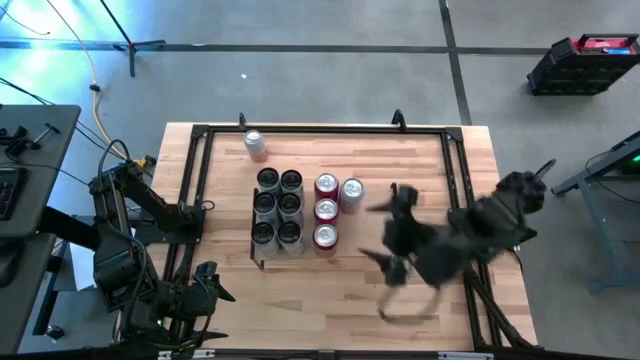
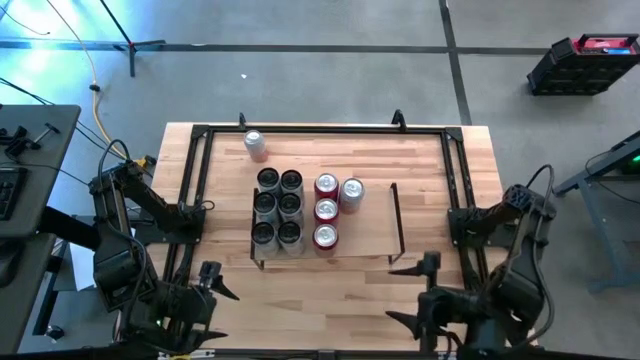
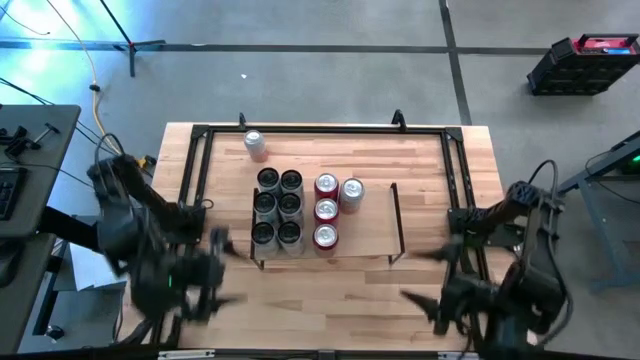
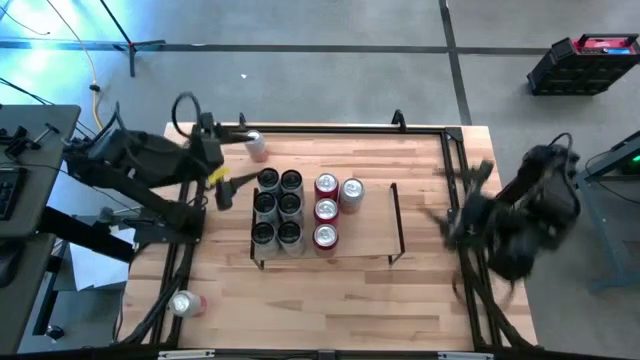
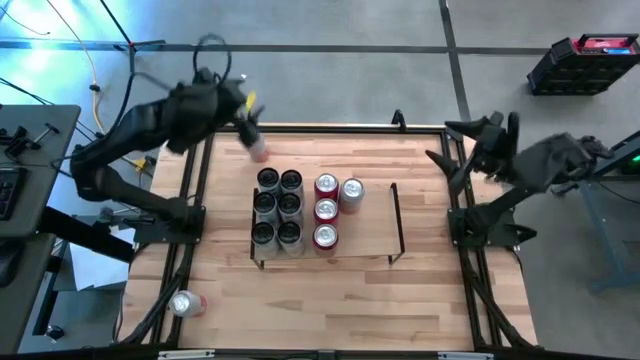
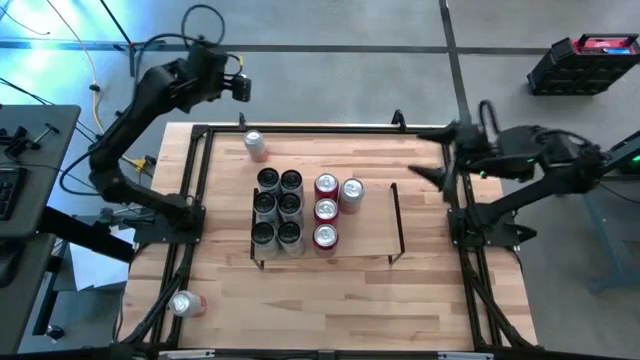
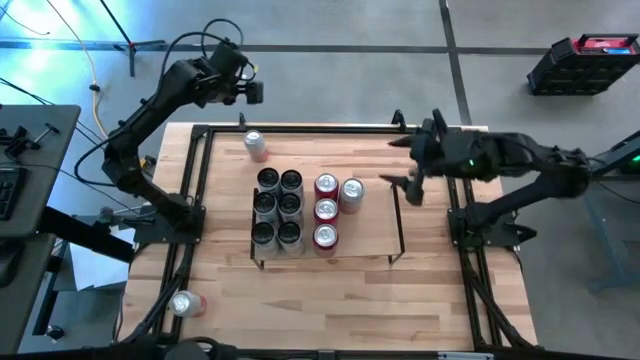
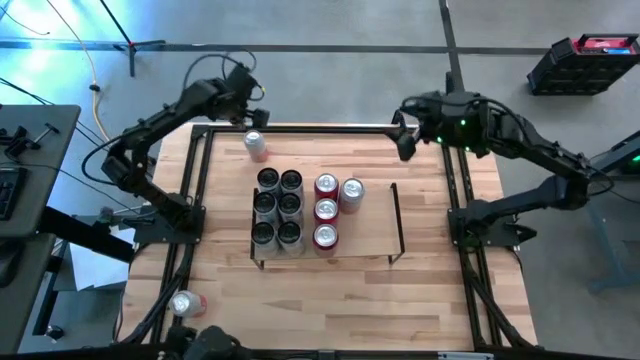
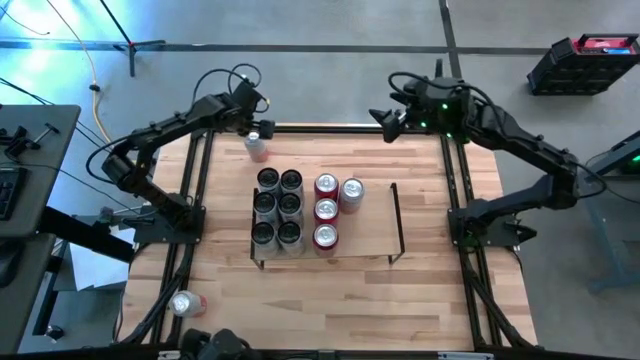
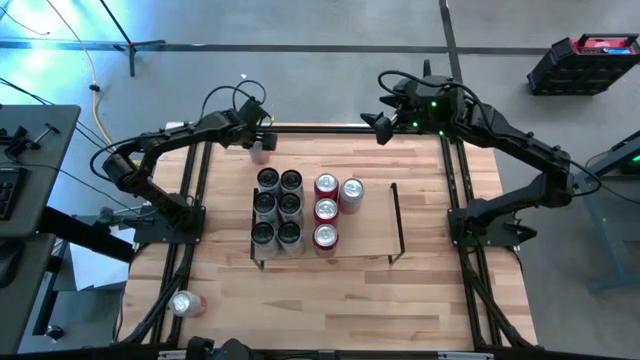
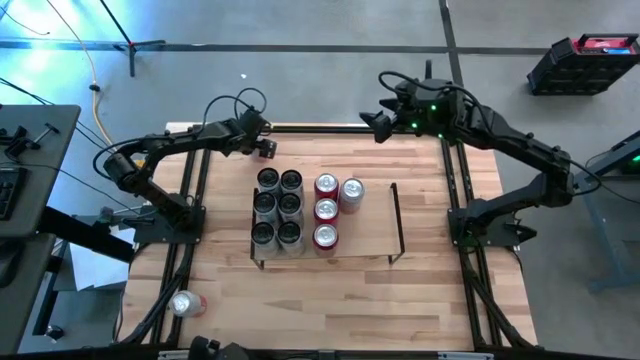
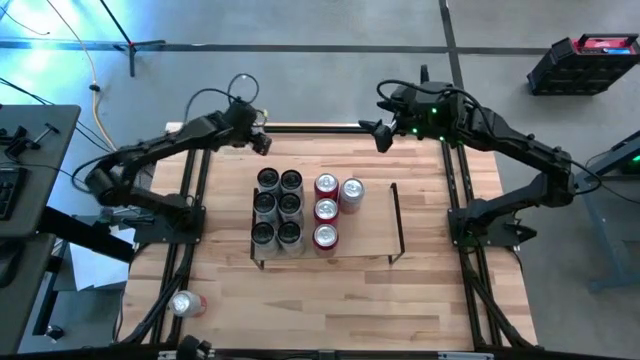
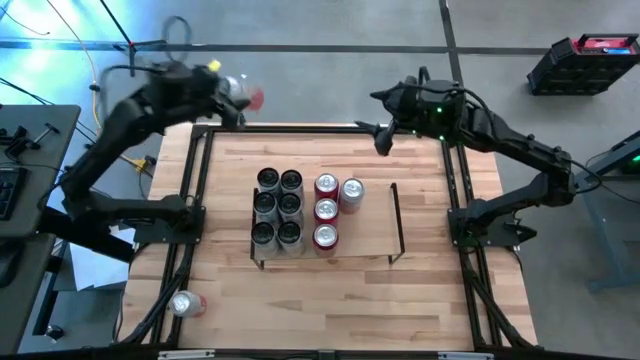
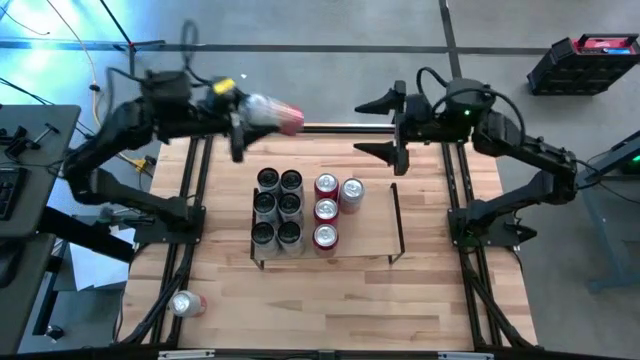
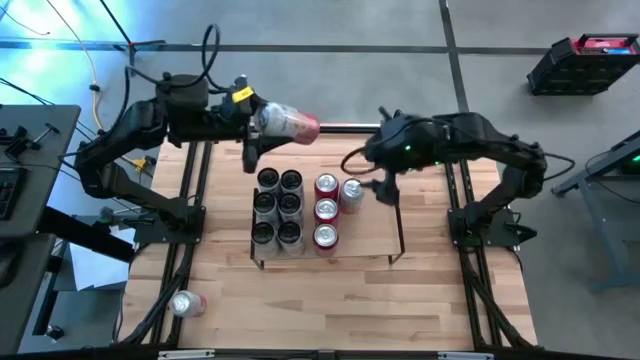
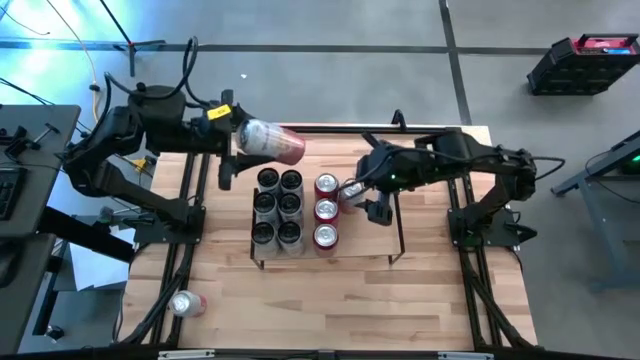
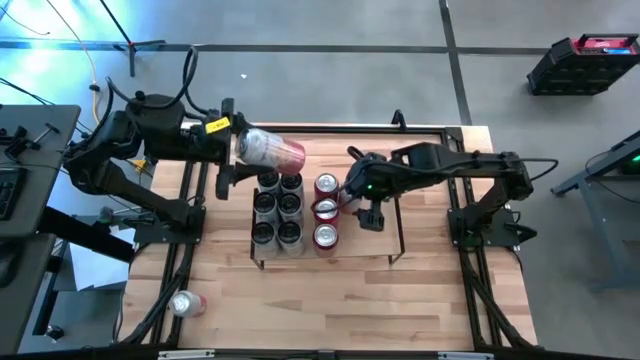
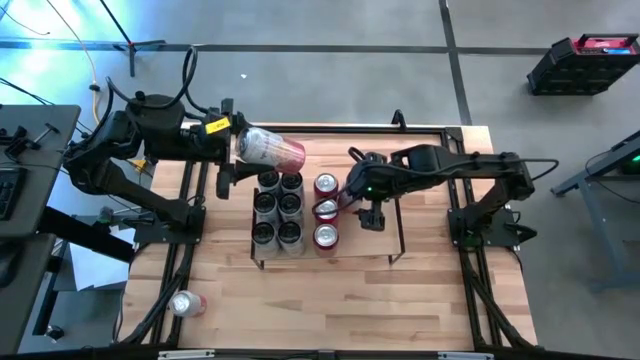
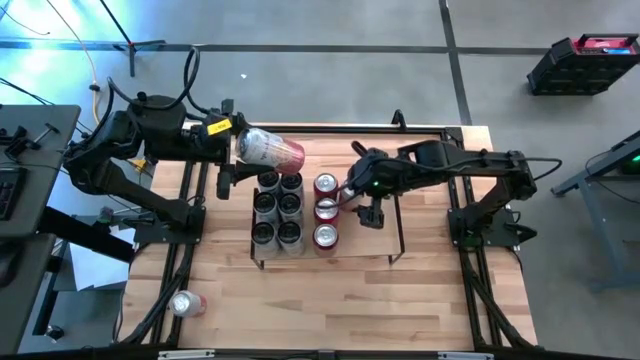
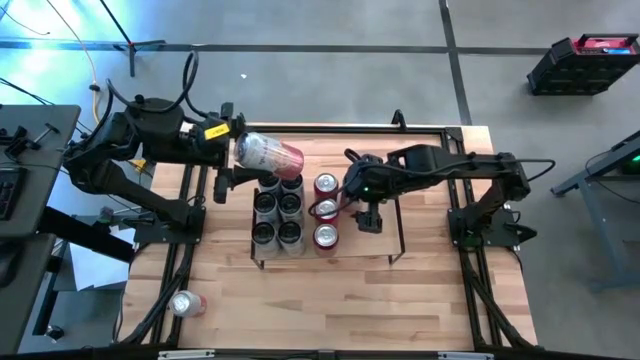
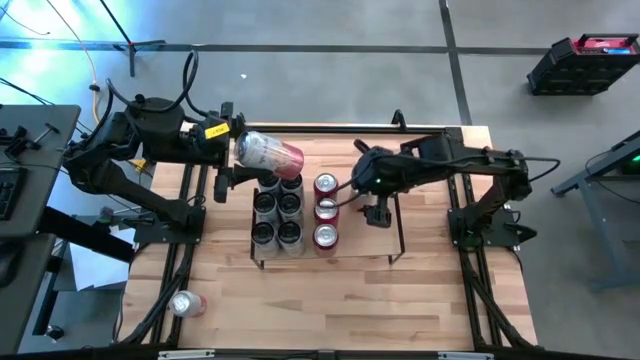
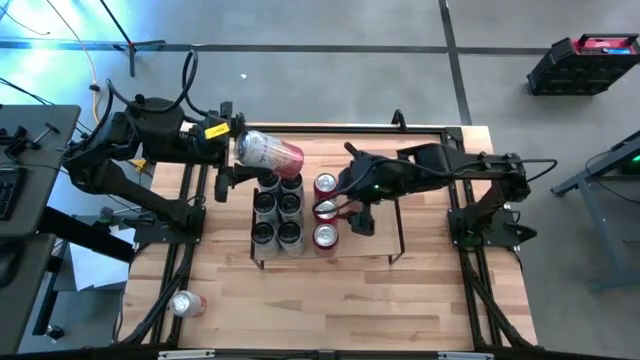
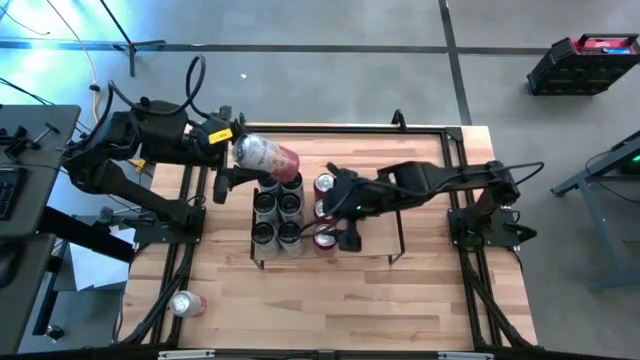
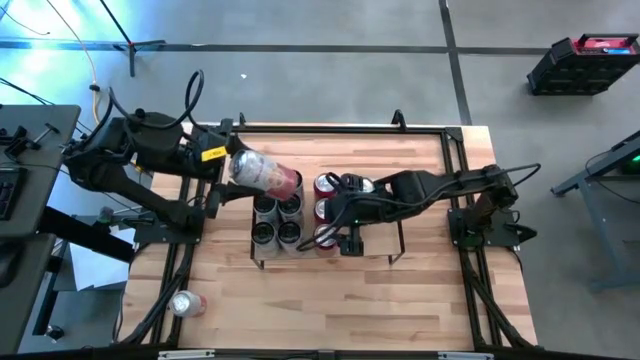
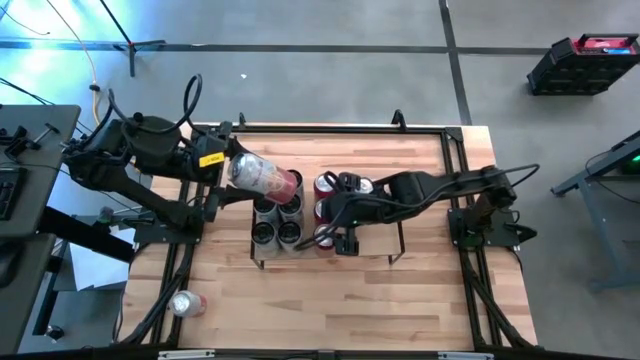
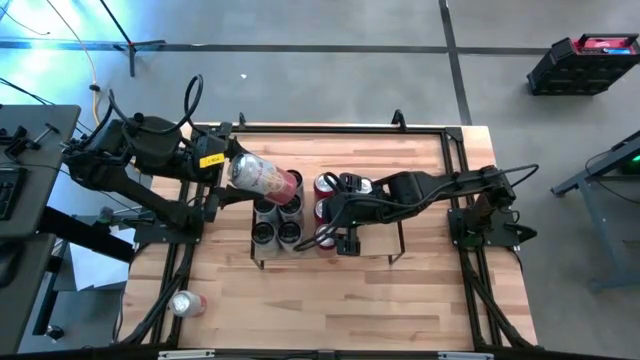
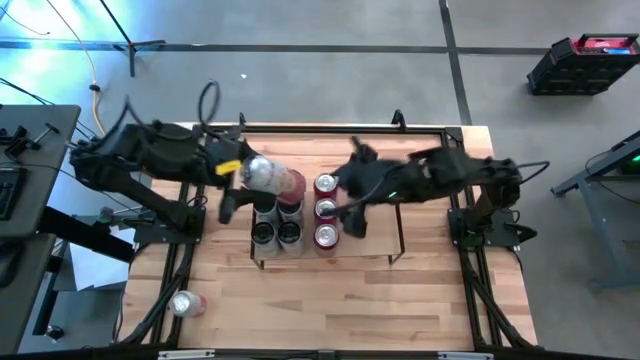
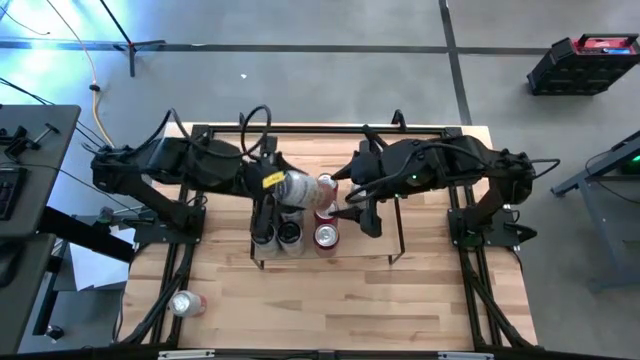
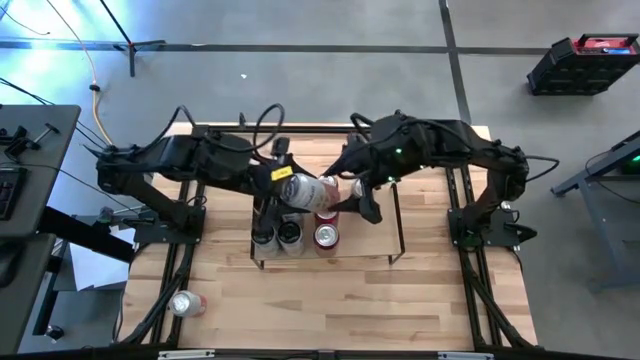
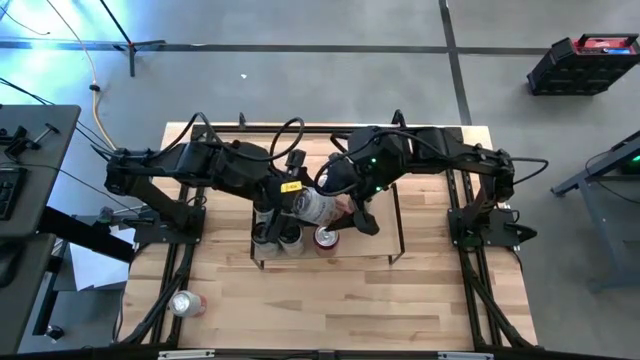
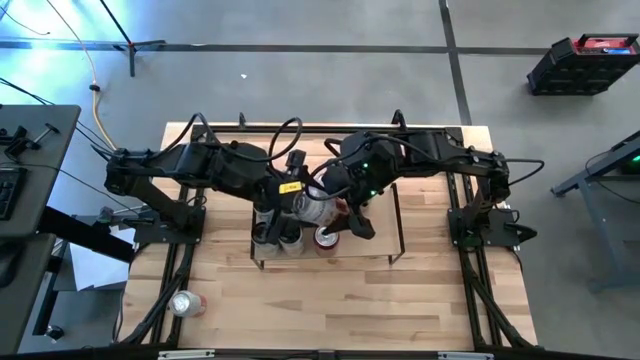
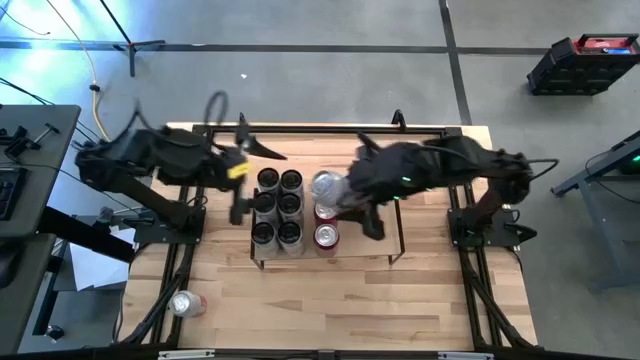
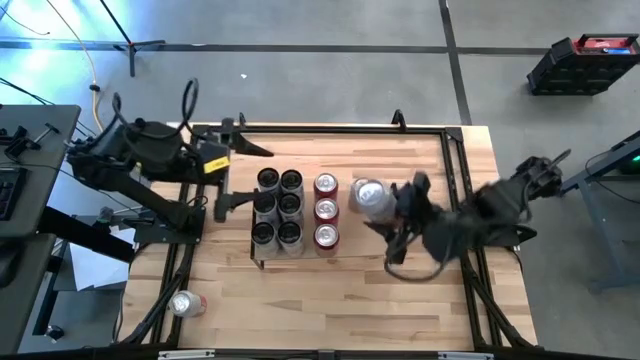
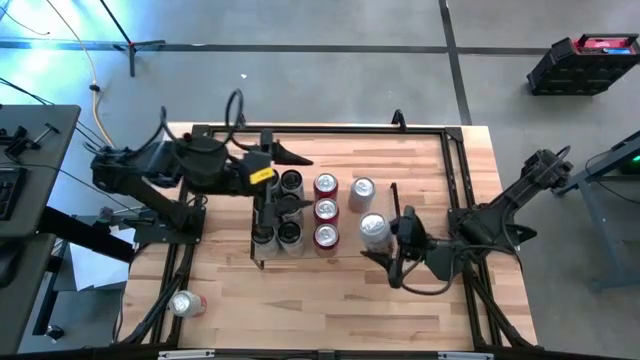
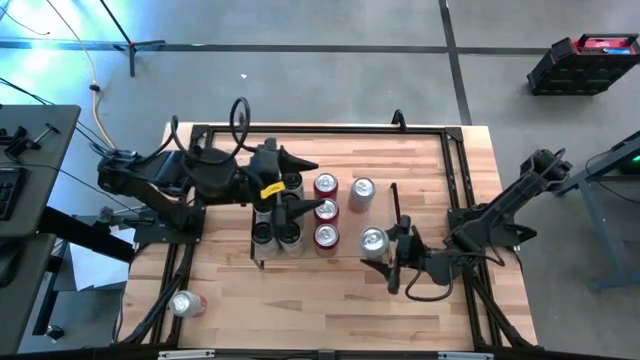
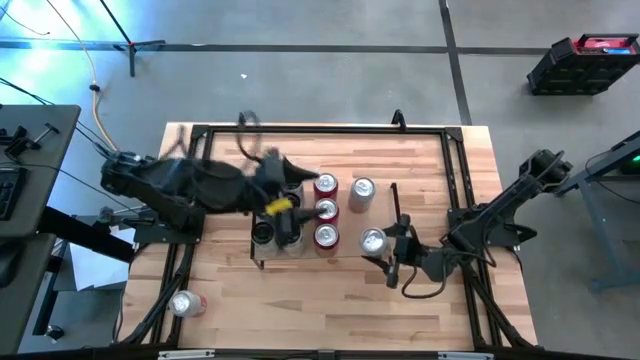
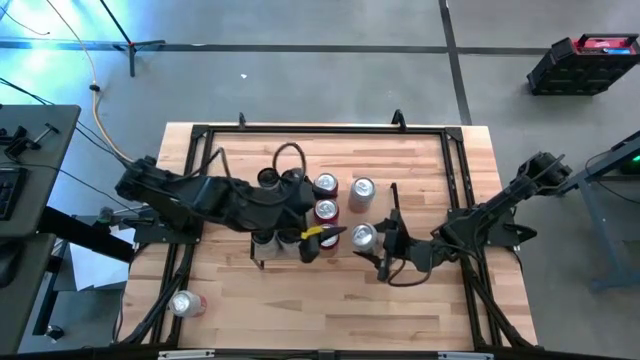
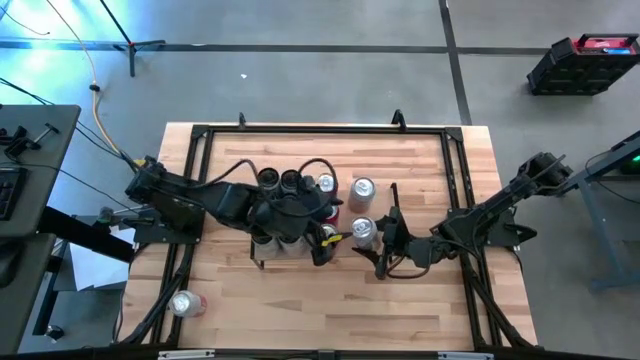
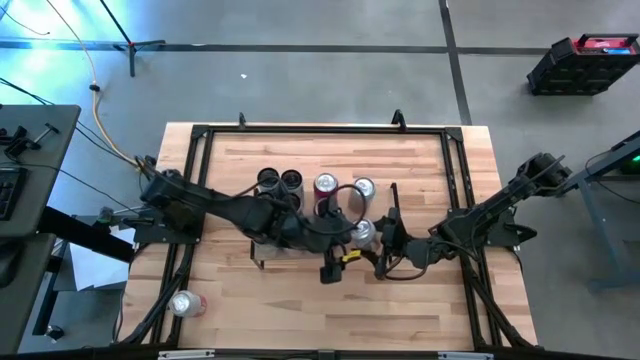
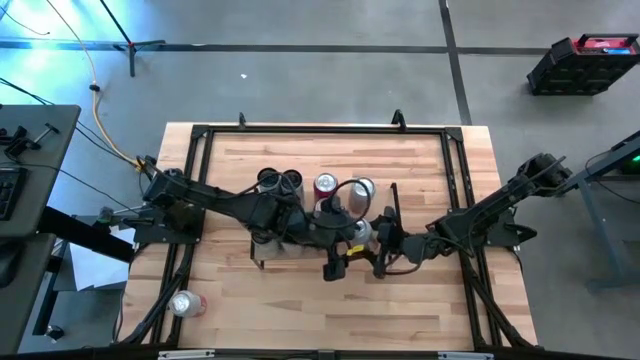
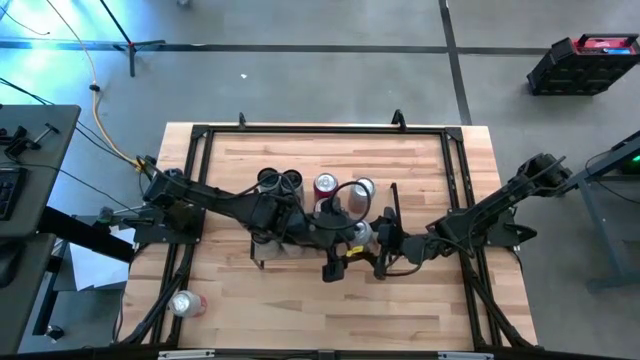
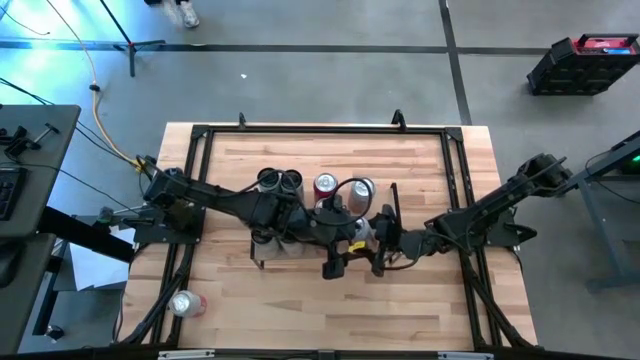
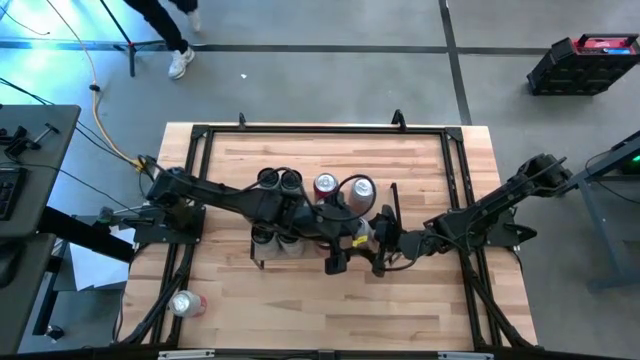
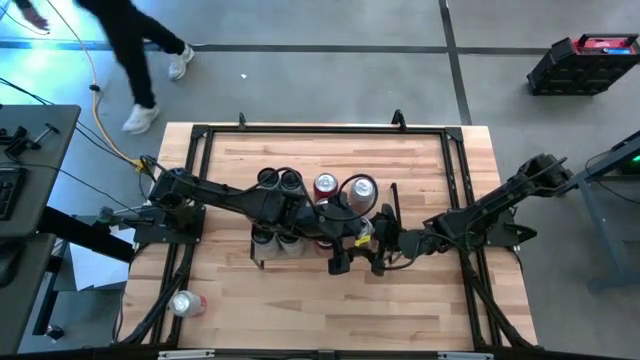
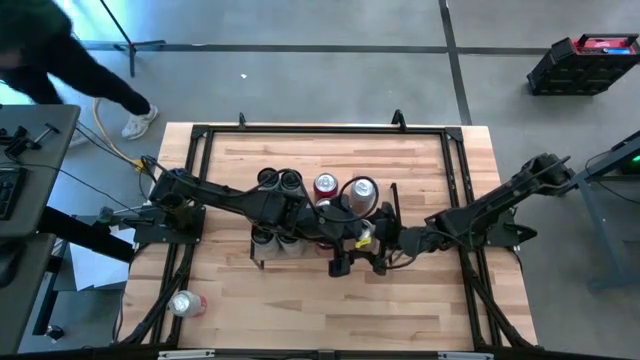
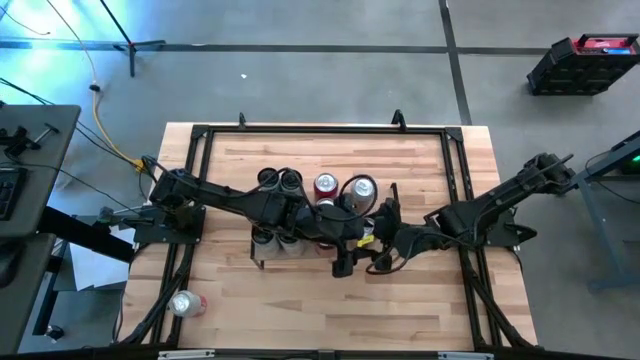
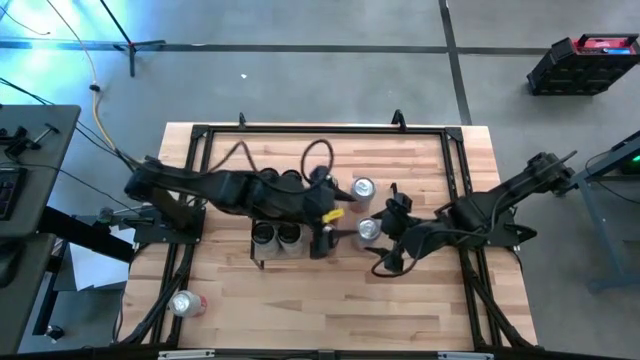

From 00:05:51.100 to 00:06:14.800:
Task: Place canned beverage on shelf
Put the orange white soda can aligned with the other orange white soda can on the shelf
